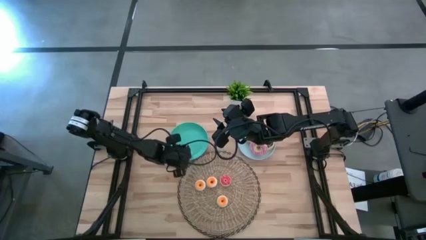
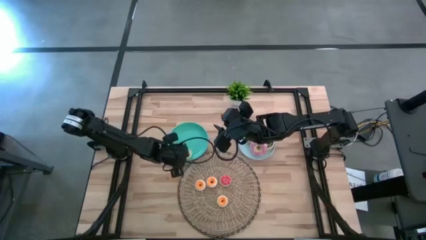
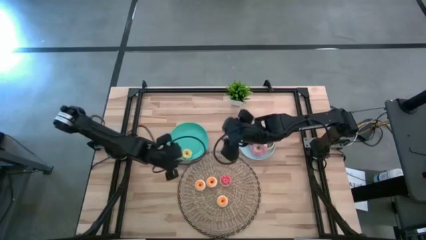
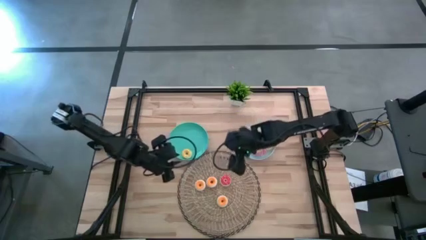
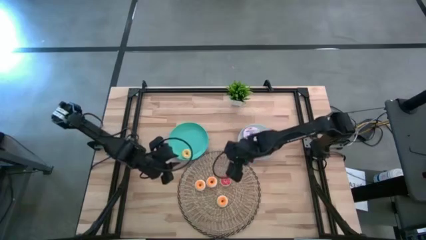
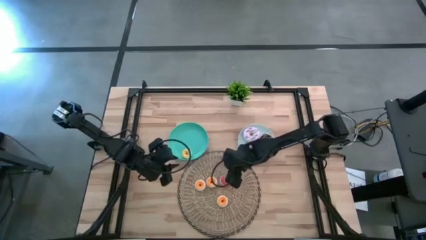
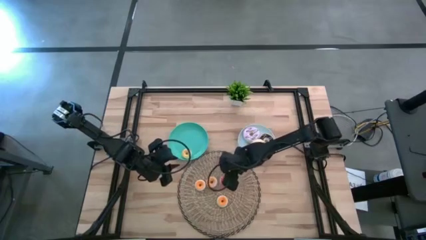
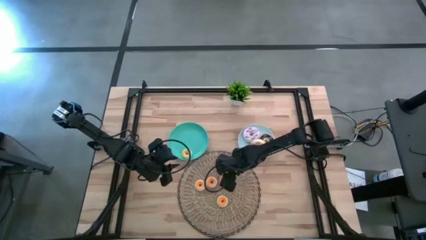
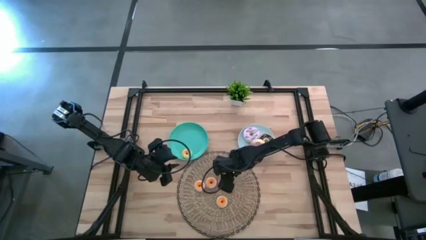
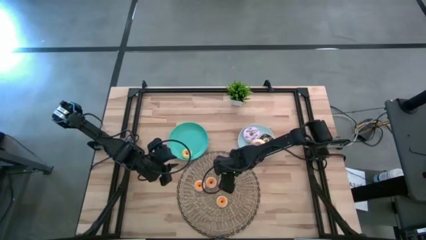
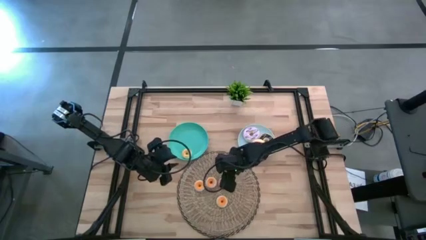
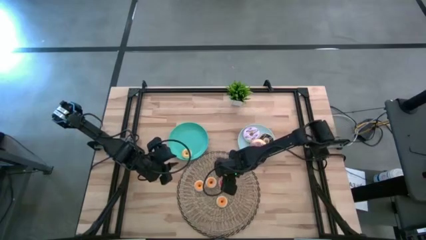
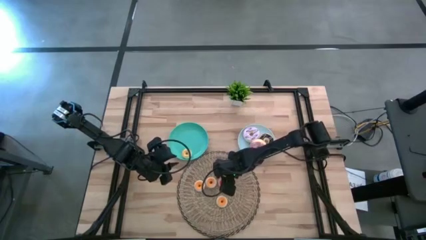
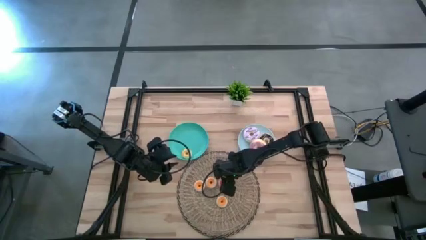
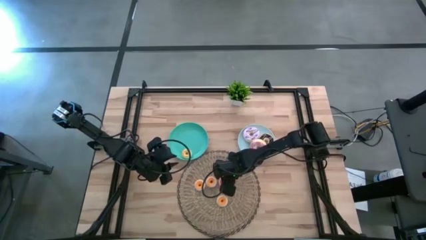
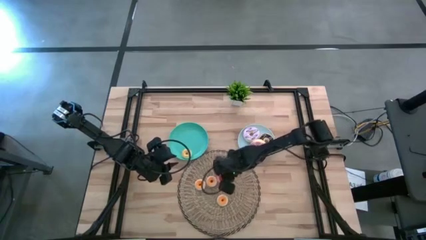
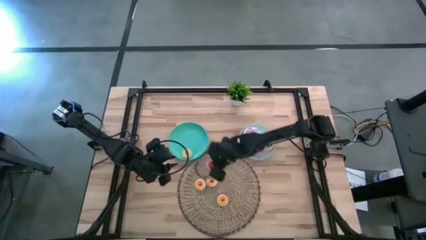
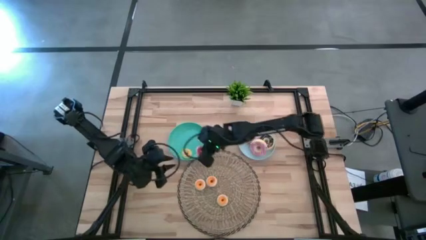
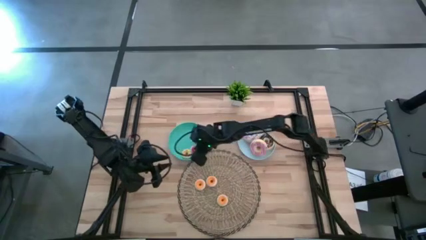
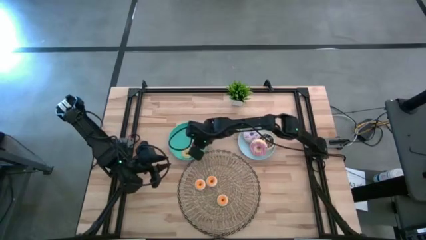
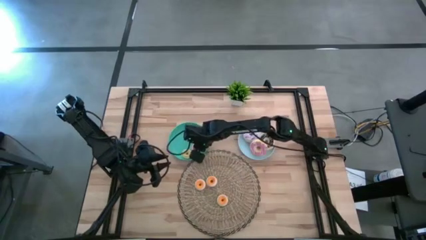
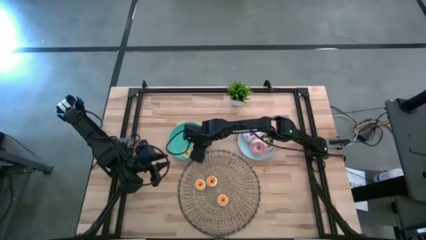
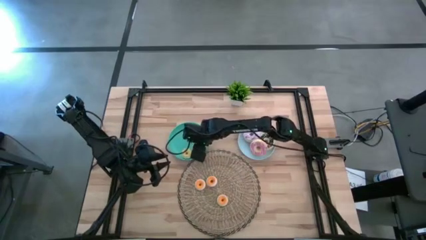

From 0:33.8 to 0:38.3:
Task: Pick & Place donuts
Put the small orange doughnut on the green plate

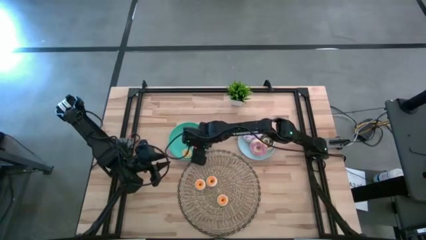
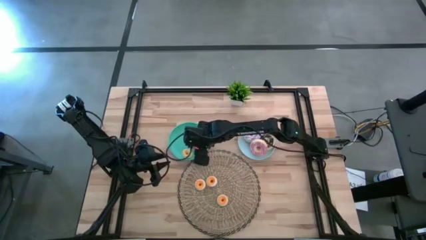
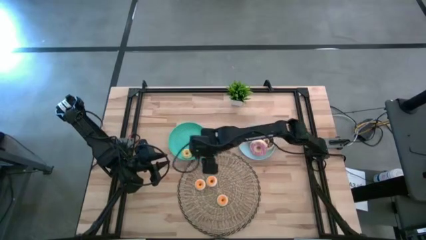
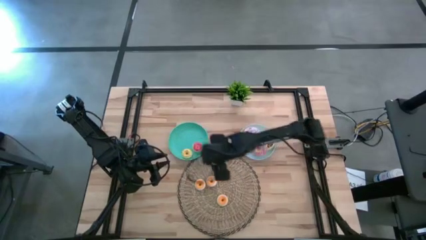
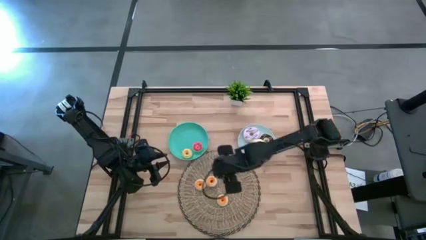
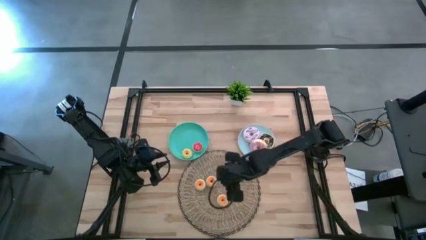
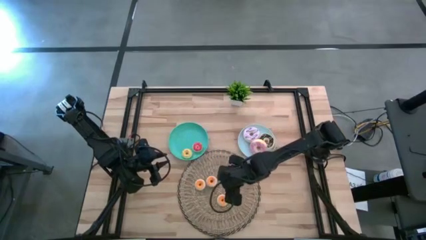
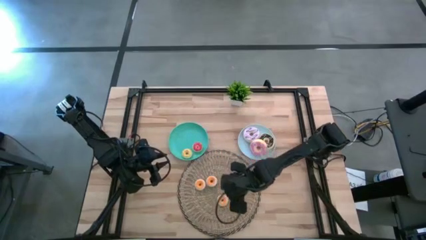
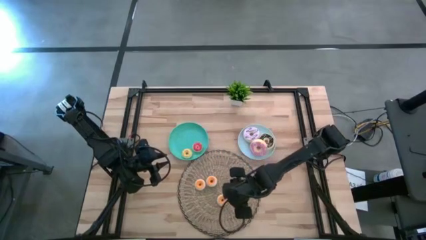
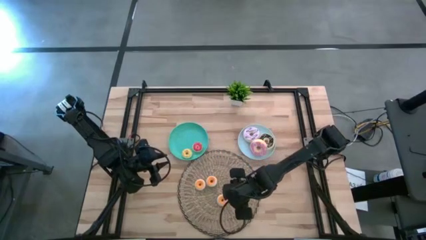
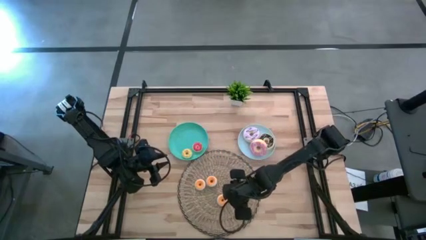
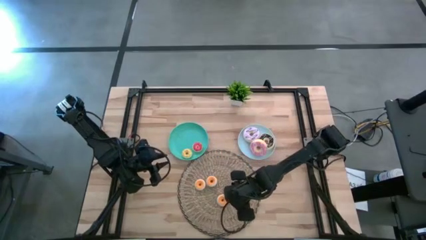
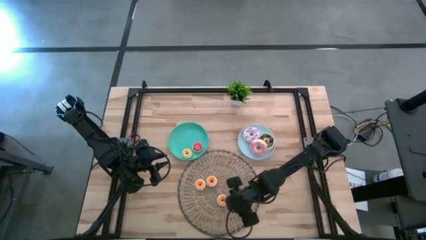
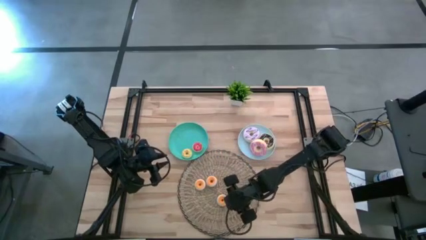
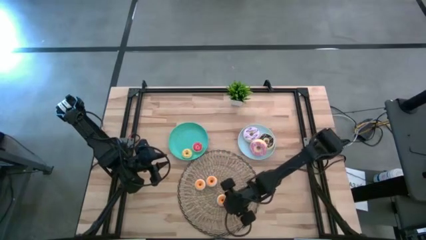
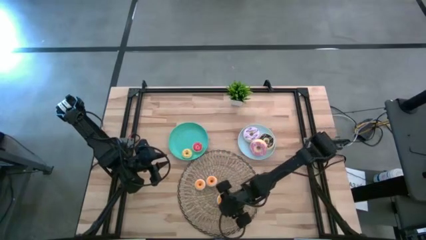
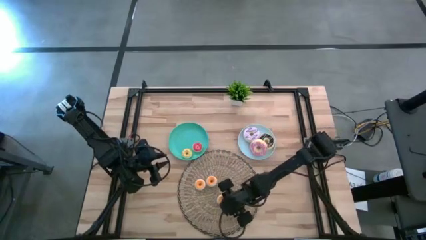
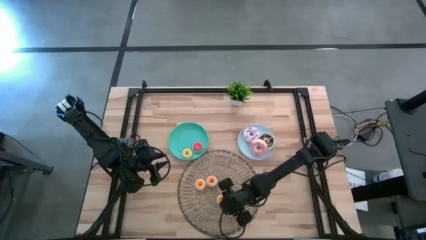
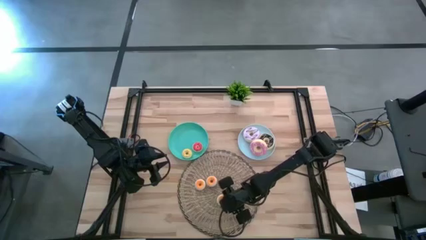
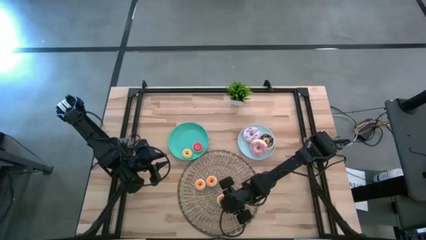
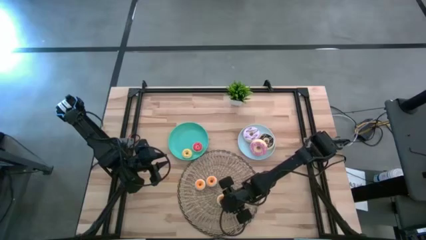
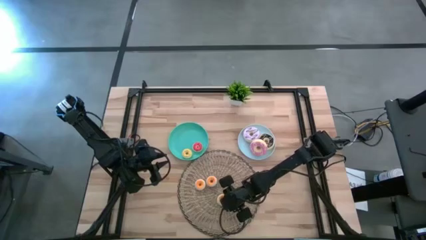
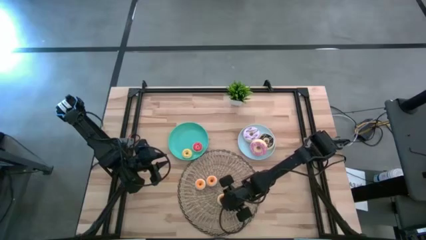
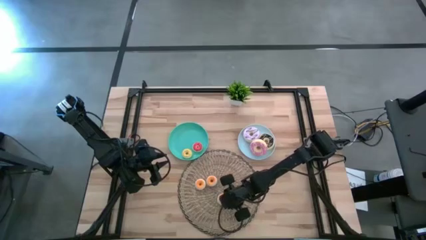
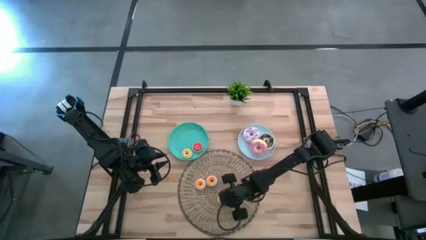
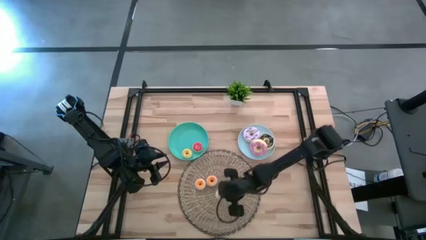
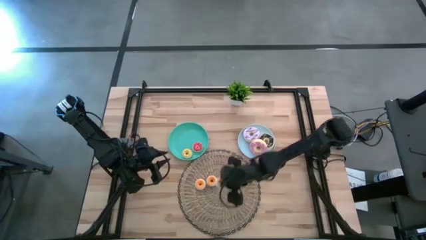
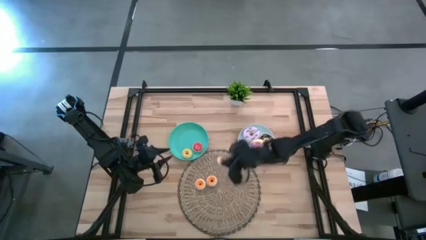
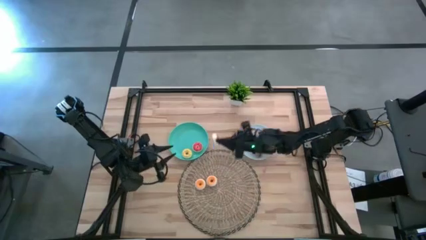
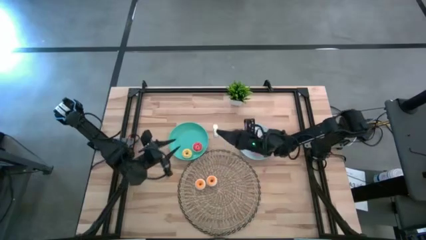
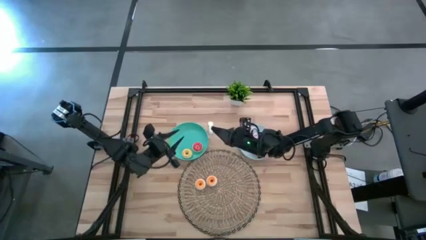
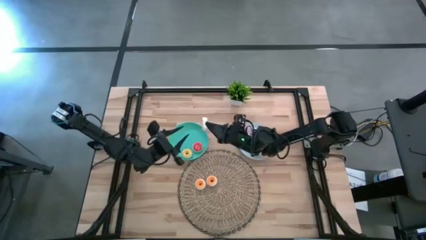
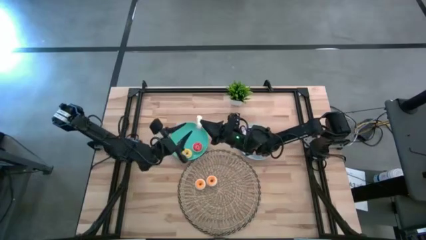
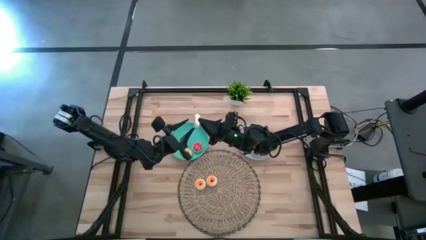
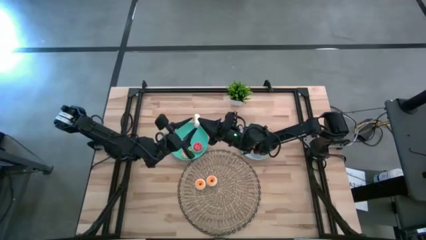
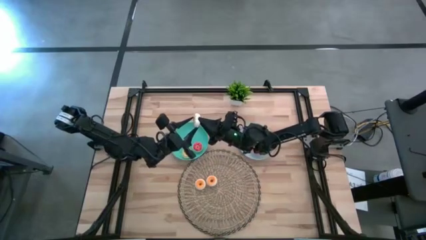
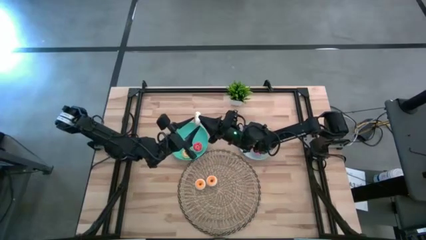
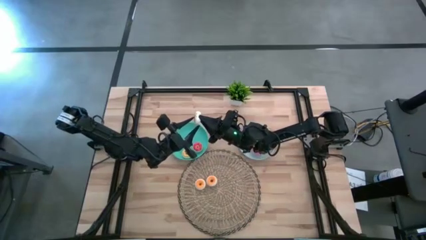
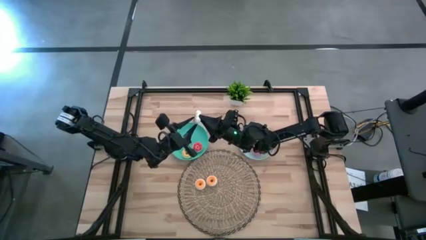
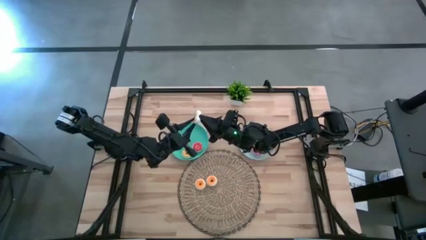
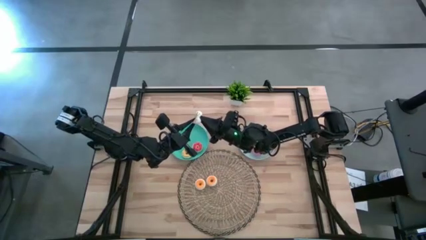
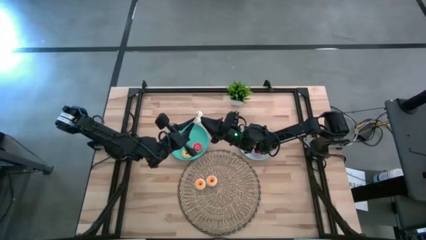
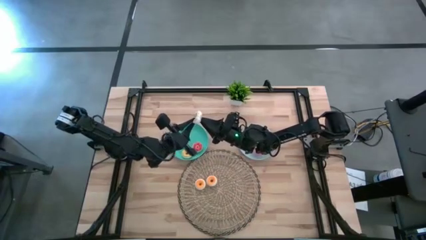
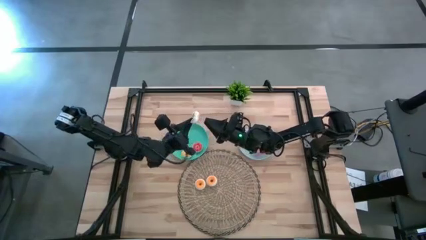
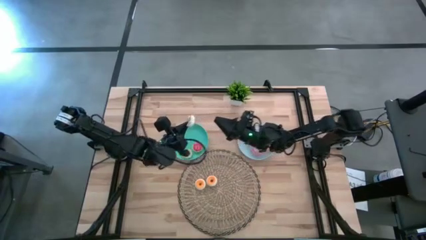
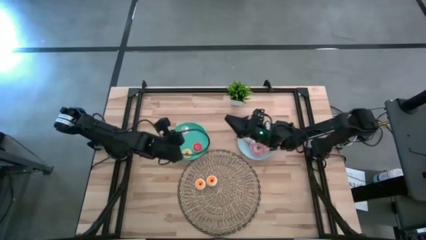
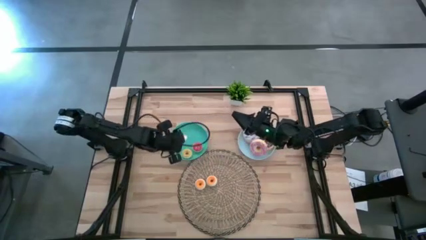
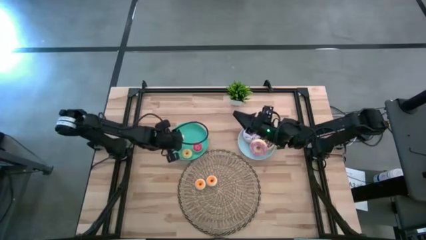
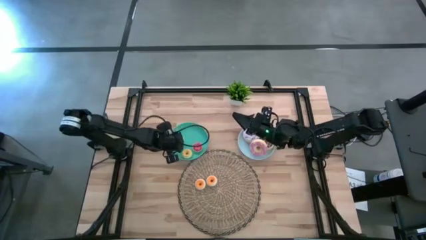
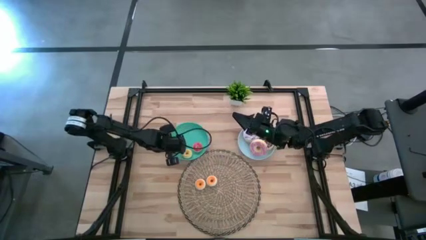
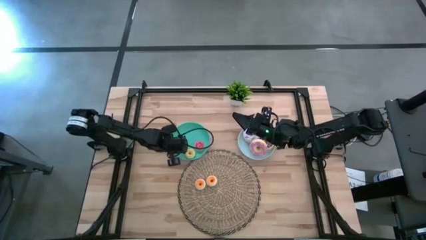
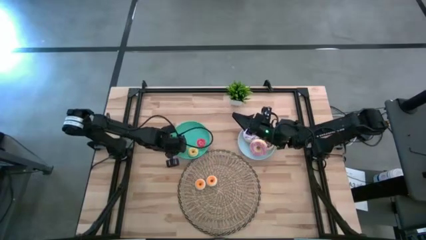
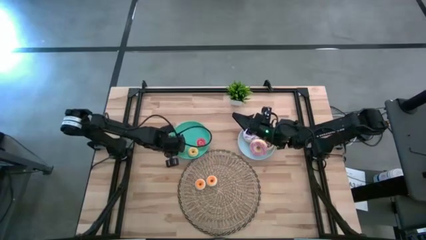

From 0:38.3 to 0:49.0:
Put the white doughnut on the green plate
